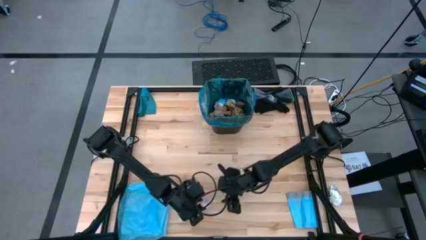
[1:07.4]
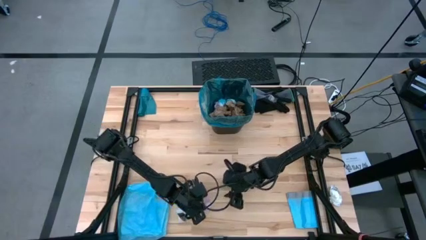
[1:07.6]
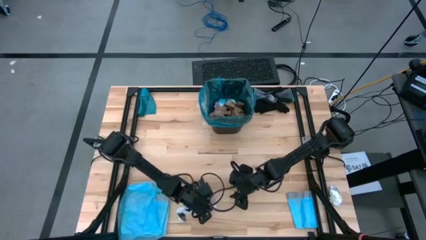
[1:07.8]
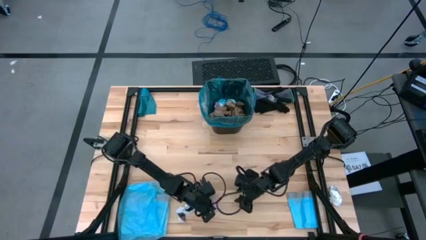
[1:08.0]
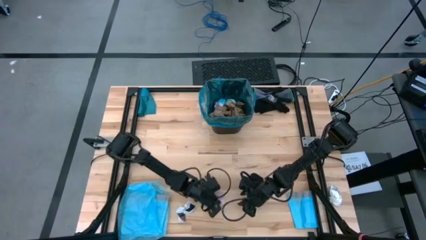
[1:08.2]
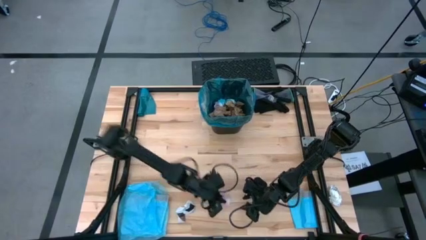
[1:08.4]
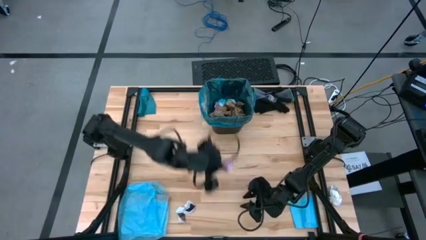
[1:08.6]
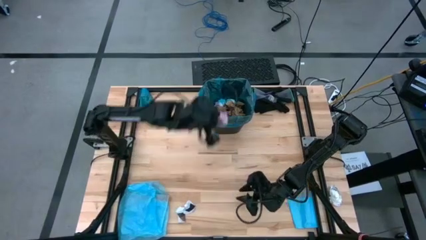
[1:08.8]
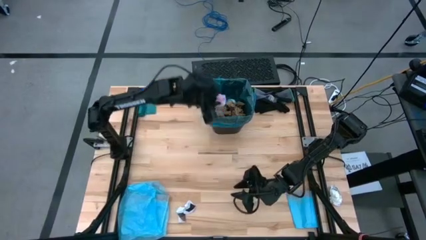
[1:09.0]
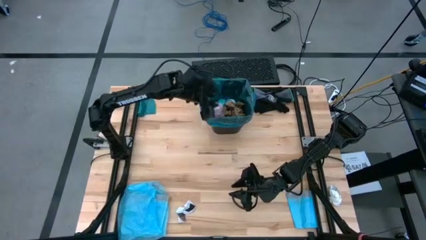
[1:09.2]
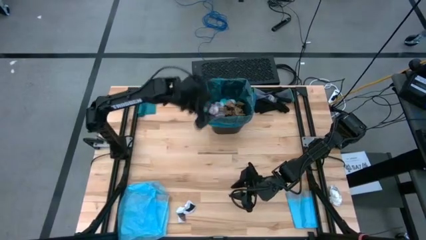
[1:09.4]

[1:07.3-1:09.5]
Task: place trash/remove bag and relplace
Put the pink plastic into the blue trash bag inside the black trash bin

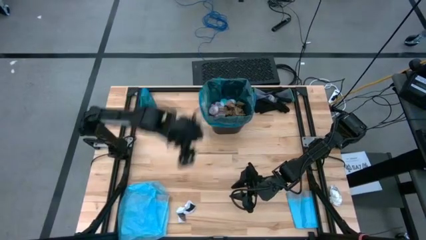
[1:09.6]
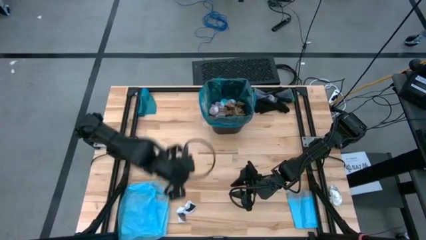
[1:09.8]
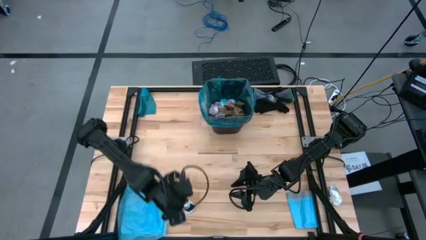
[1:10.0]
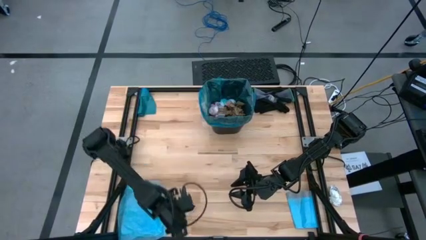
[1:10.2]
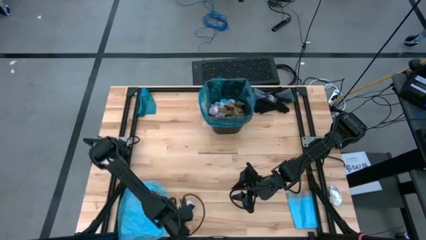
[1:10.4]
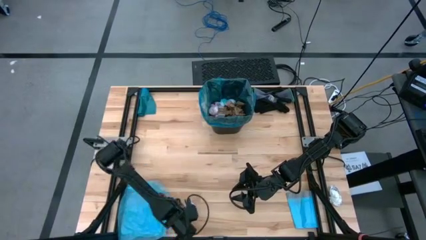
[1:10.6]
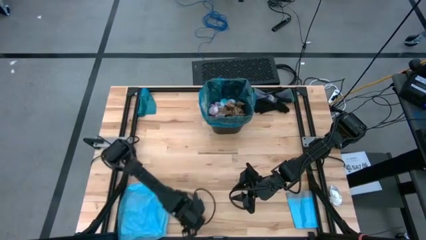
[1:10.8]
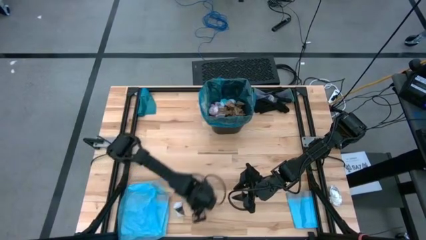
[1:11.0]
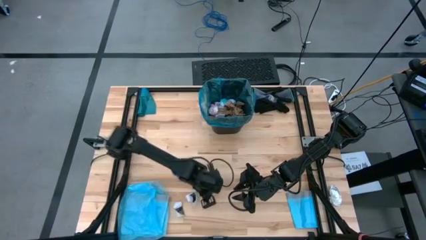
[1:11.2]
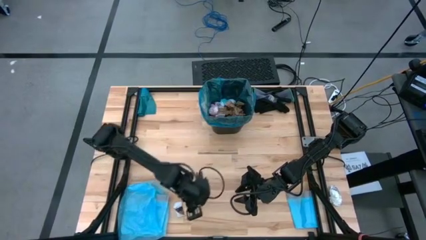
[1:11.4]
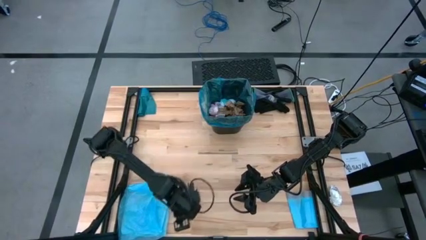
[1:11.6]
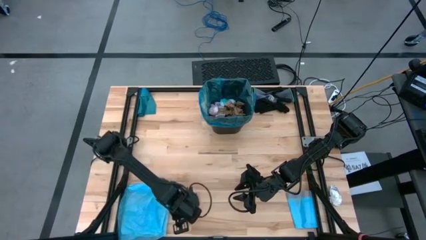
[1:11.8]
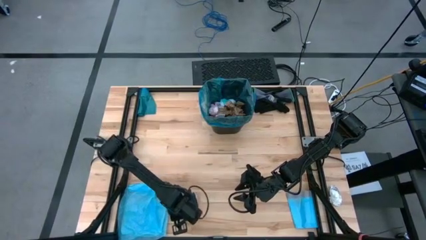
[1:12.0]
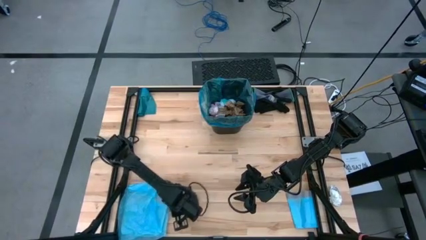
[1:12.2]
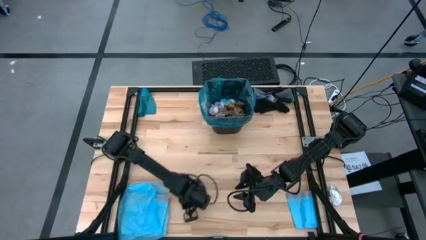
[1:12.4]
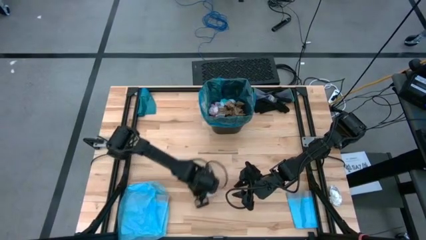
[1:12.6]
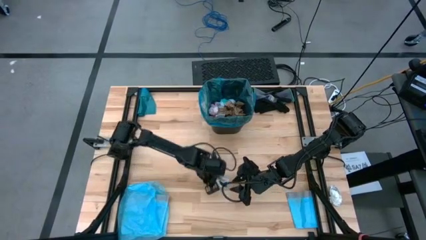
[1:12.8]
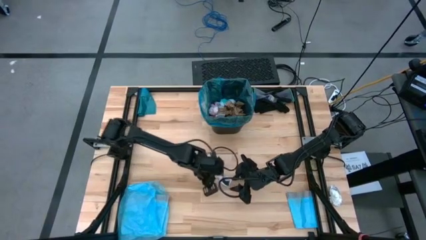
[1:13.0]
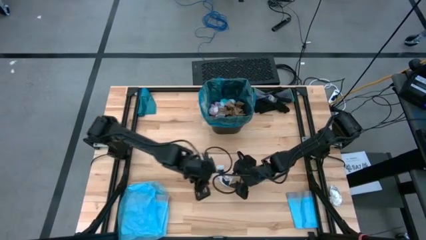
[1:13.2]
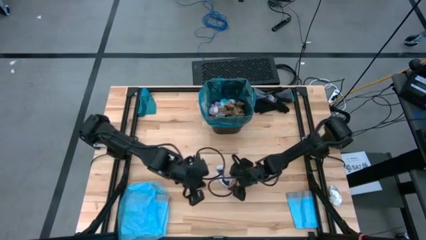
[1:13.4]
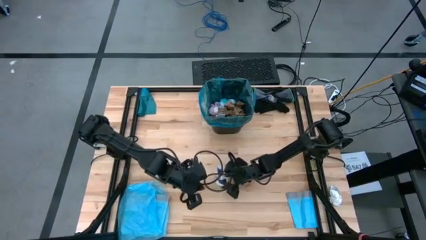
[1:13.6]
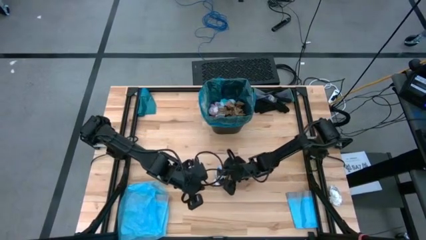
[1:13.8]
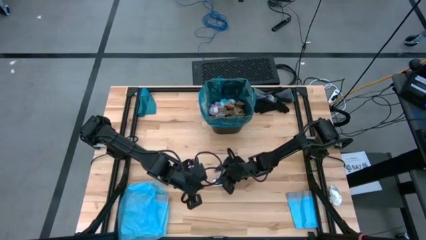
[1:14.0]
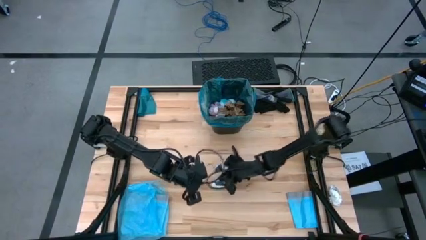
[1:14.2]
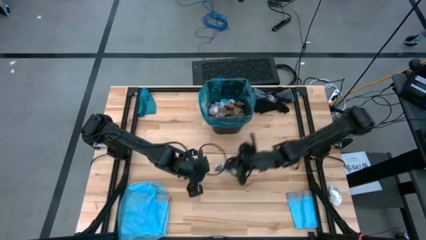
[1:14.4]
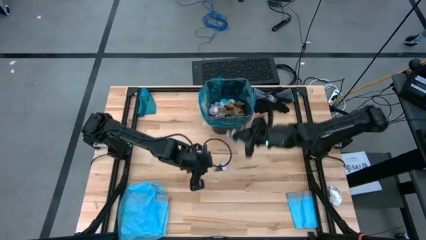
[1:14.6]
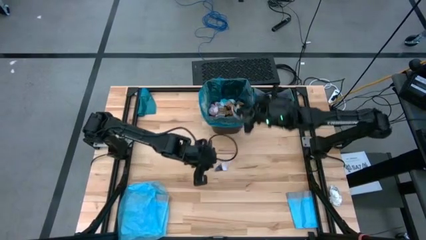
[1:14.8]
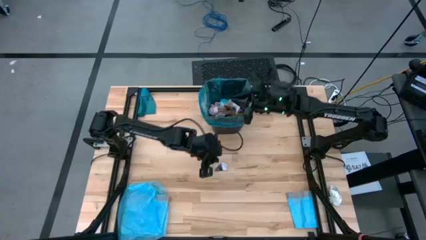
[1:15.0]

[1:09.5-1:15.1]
Put the white paper into the blue trash bag inside the black trash bin

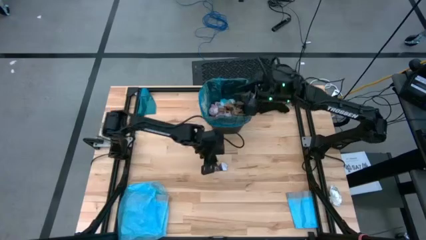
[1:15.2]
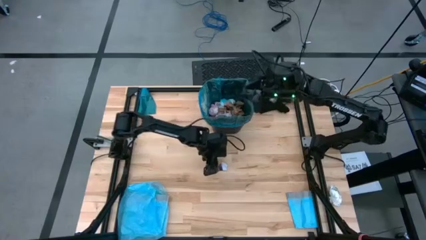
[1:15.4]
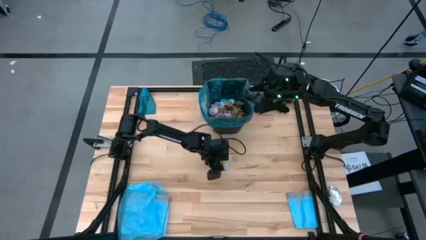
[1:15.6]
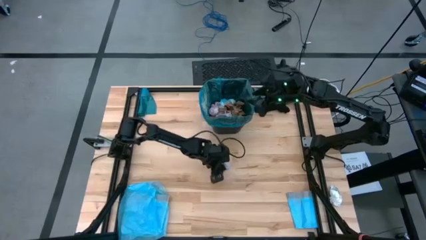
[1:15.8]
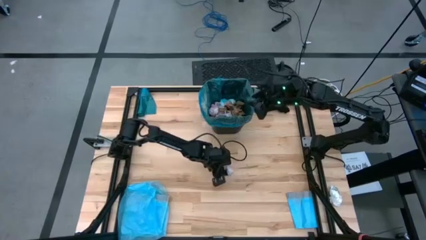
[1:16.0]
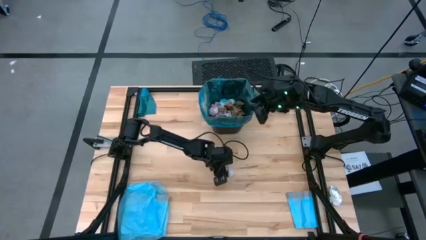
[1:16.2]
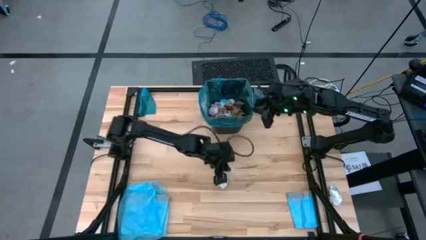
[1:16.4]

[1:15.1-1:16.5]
Put the white paper into the blue trash bag inside the black trash bin

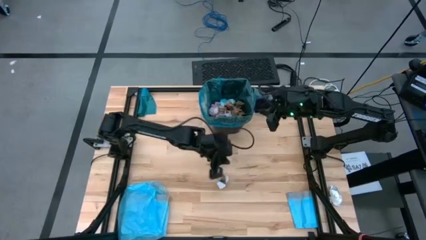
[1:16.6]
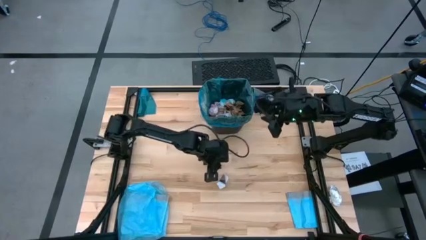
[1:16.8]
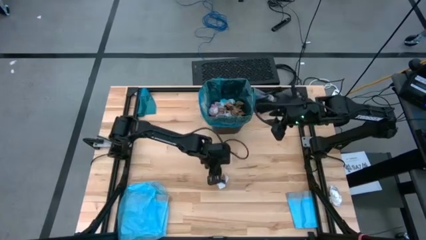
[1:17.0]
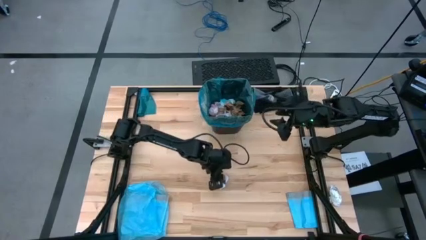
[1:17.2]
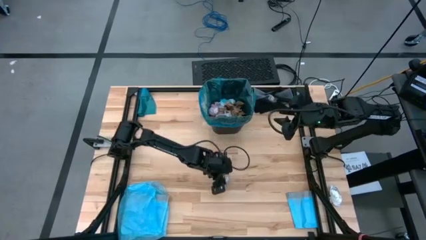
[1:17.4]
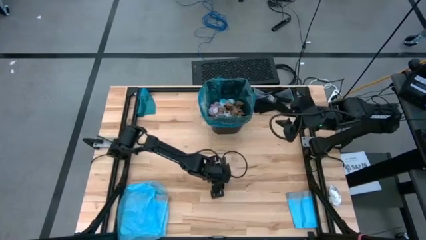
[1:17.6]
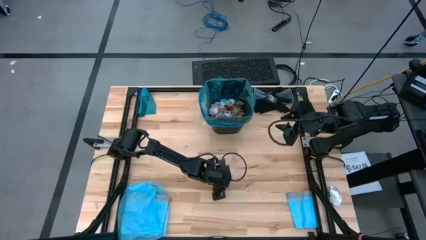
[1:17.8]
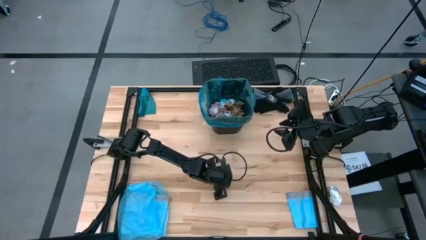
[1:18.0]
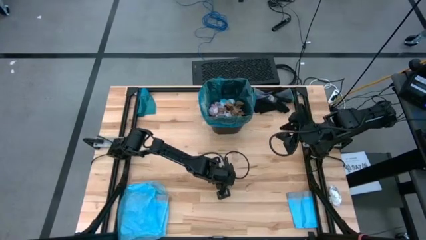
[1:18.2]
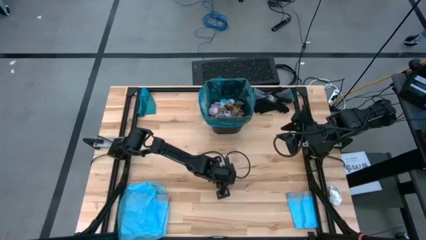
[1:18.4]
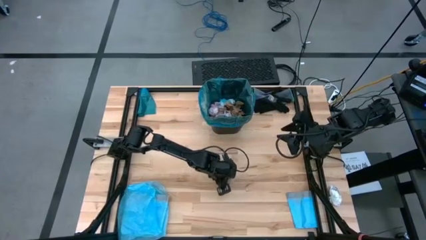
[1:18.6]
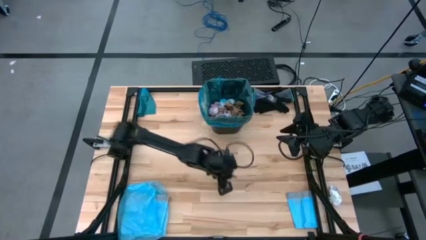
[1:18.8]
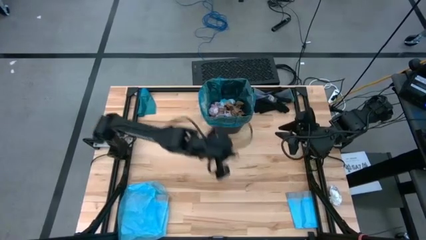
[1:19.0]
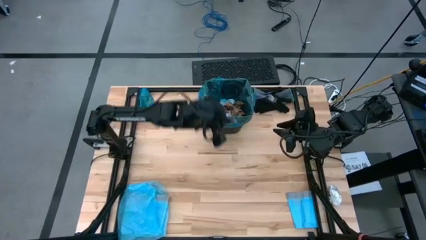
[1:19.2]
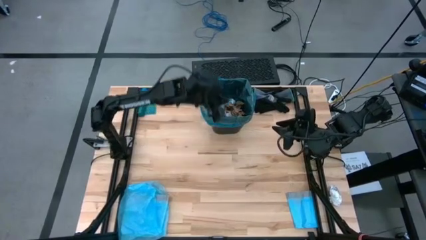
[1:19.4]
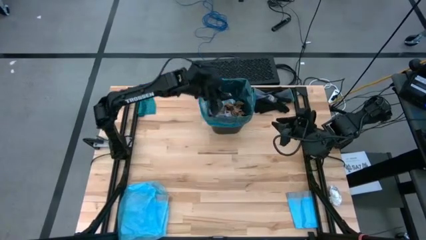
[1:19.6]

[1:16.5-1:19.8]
Put the white paper into the blue trash bag inside the black trash bin

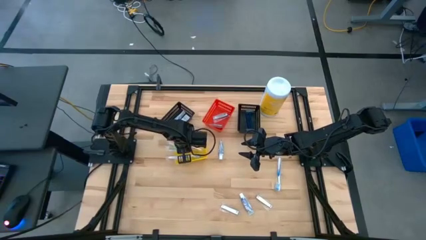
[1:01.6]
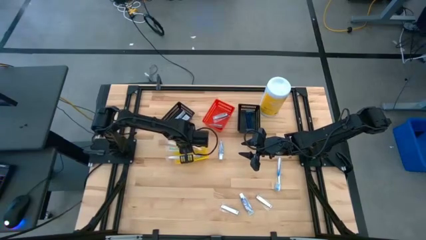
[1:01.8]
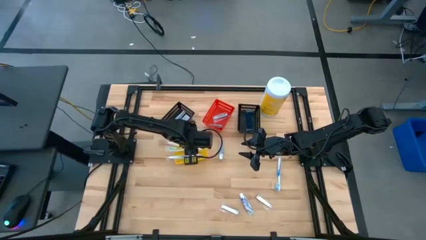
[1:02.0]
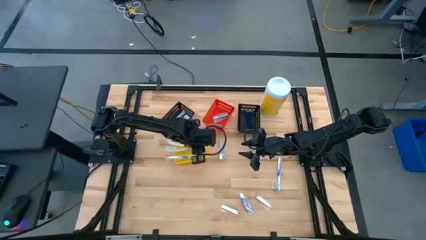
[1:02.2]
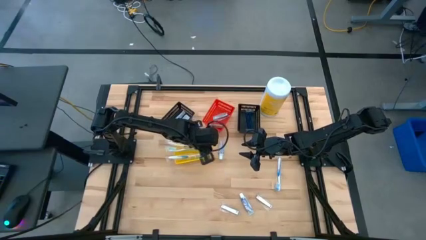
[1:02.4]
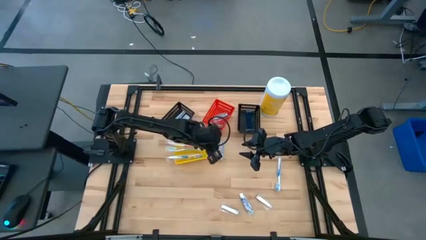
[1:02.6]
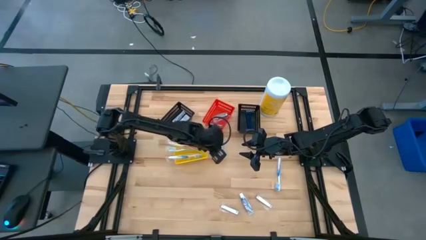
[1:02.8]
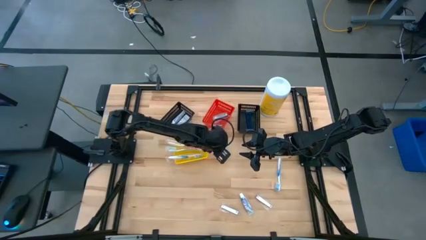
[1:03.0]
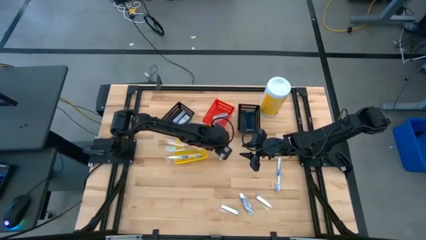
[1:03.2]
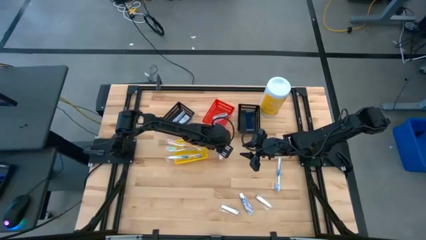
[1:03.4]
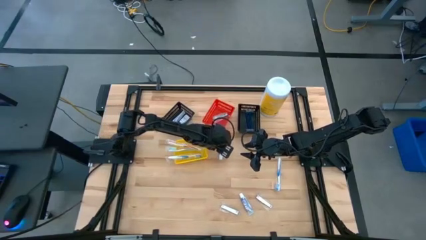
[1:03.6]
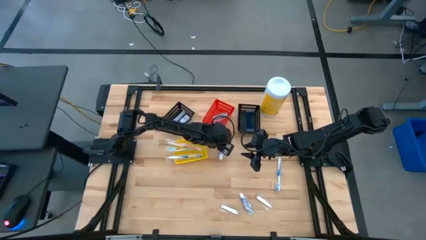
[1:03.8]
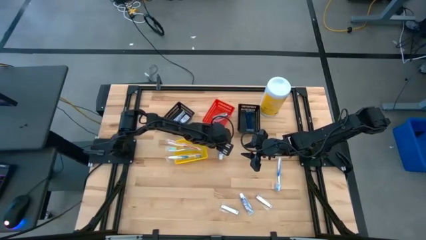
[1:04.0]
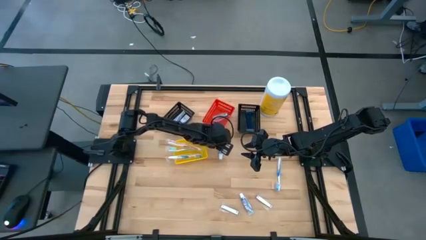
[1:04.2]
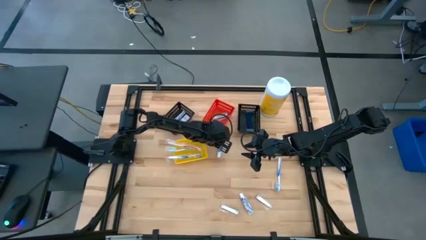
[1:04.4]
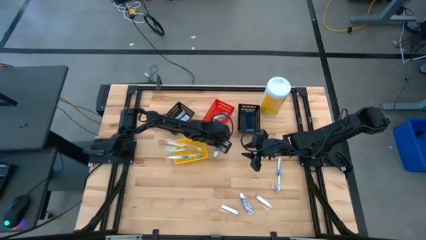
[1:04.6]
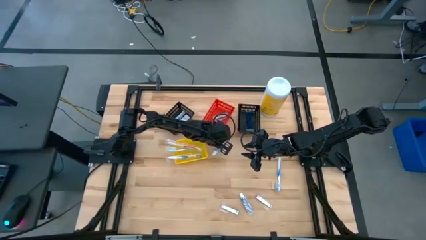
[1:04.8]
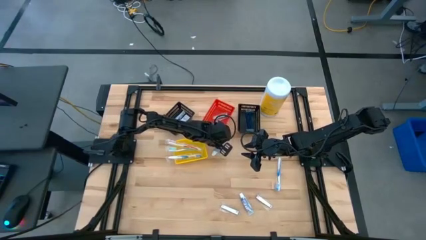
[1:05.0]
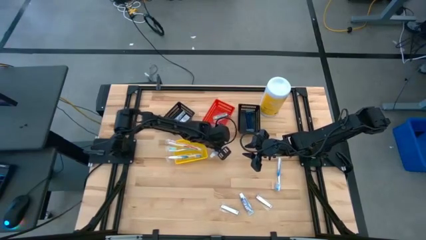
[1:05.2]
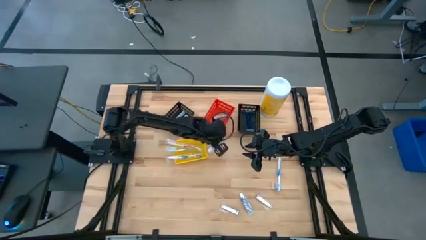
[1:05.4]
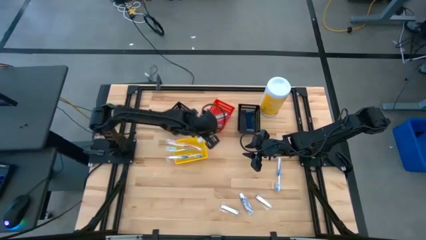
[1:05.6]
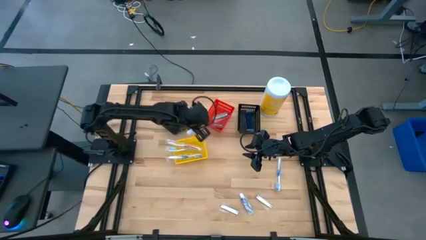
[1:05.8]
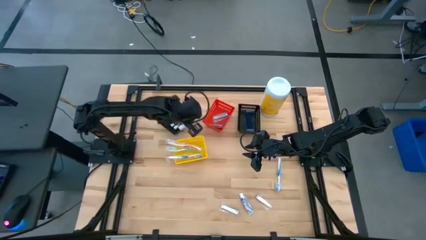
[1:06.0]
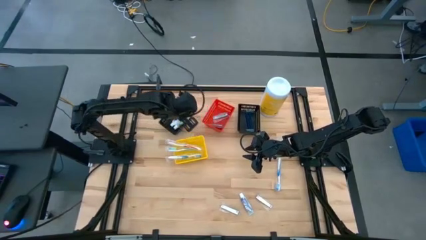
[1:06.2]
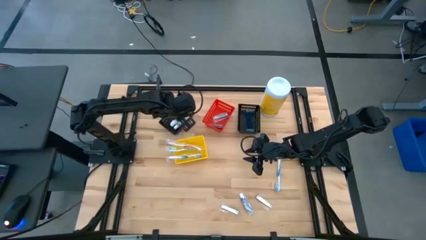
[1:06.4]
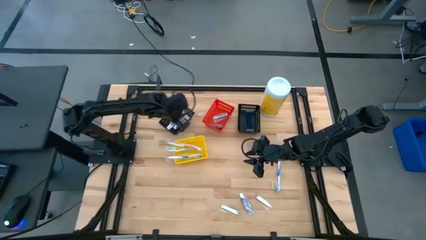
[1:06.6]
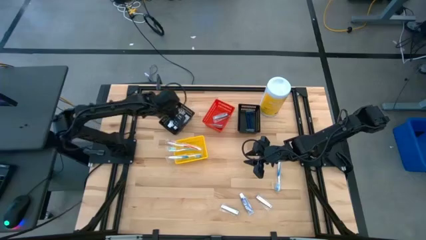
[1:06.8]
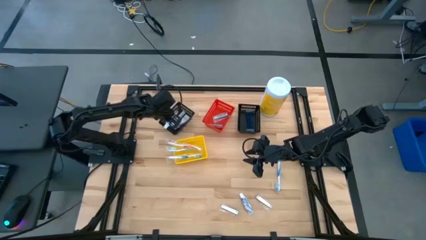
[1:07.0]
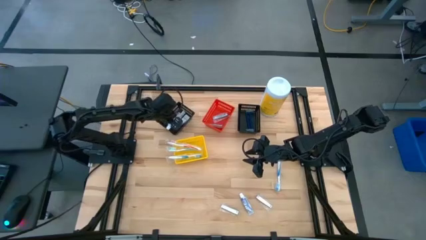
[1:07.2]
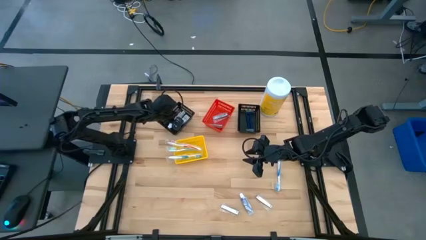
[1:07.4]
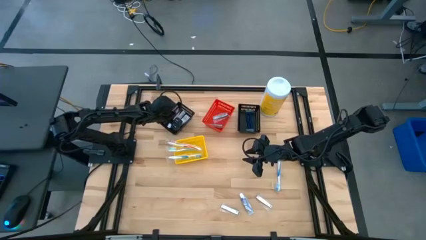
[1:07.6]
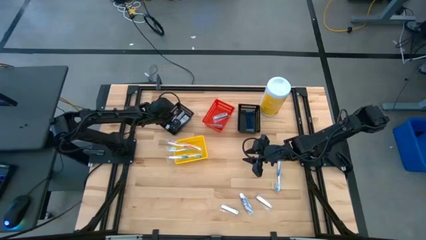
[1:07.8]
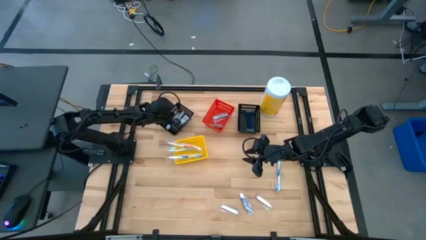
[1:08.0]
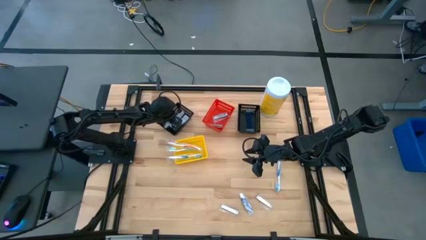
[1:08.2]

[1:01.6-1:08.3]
Task: Pick & Place Travel size toiletries
Put the white toothpaste into the left black bin
